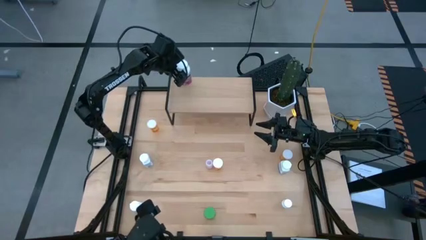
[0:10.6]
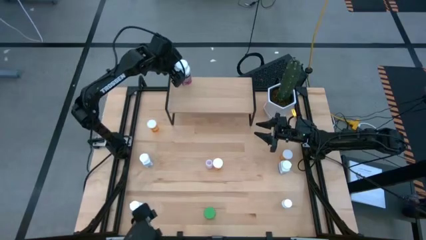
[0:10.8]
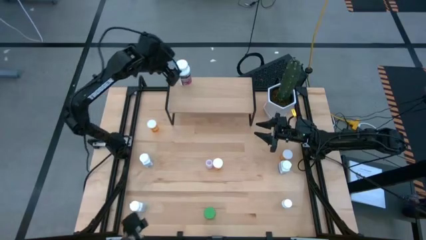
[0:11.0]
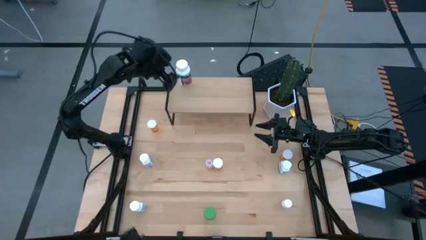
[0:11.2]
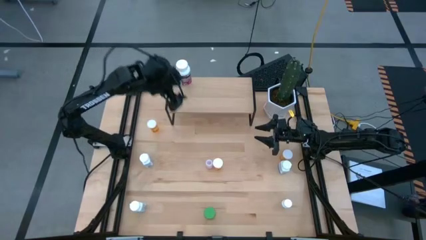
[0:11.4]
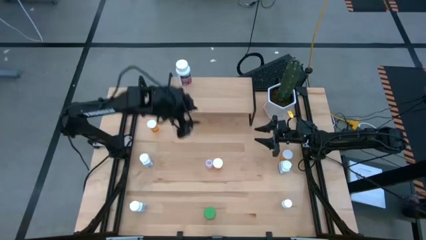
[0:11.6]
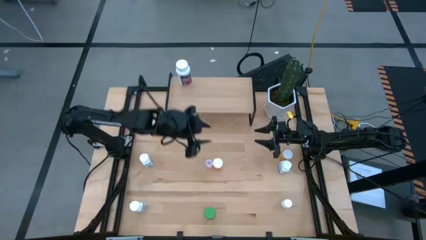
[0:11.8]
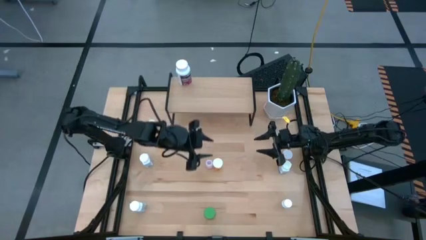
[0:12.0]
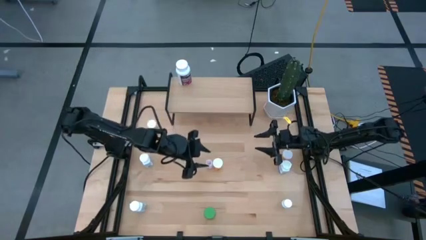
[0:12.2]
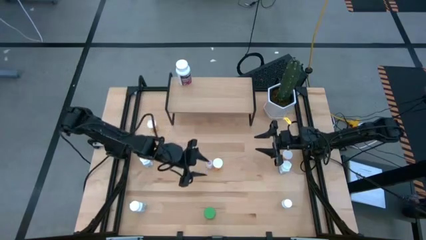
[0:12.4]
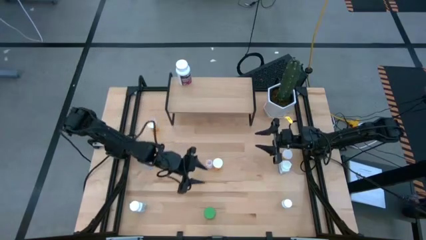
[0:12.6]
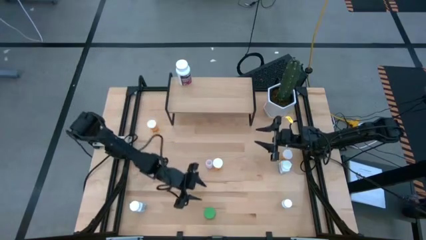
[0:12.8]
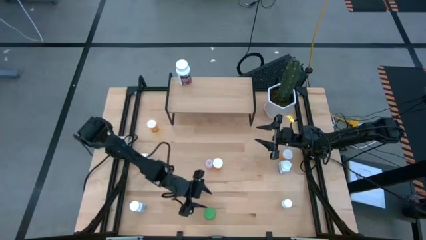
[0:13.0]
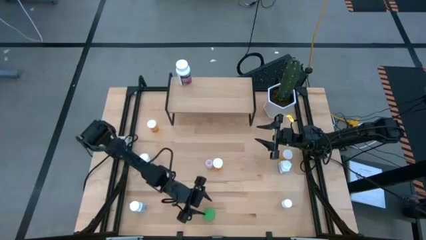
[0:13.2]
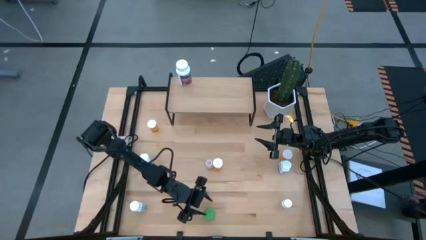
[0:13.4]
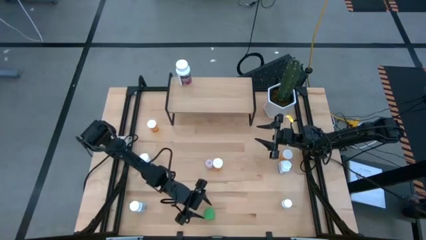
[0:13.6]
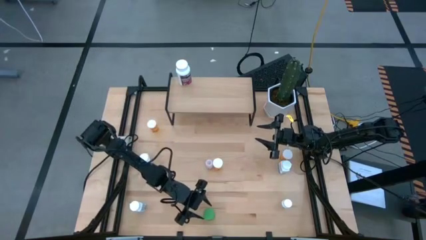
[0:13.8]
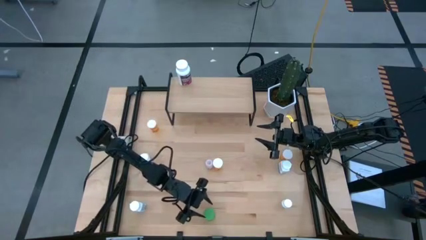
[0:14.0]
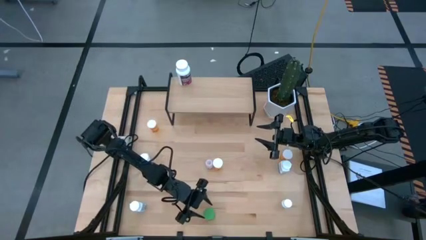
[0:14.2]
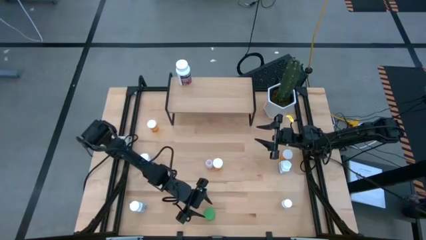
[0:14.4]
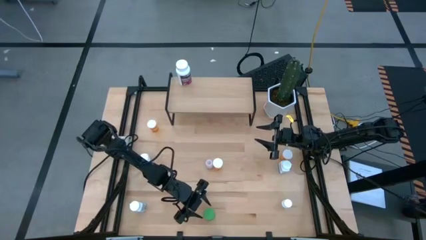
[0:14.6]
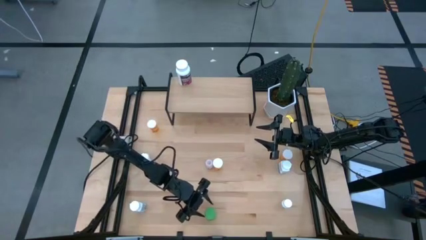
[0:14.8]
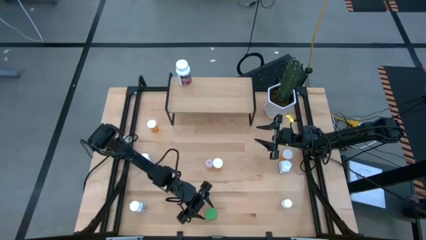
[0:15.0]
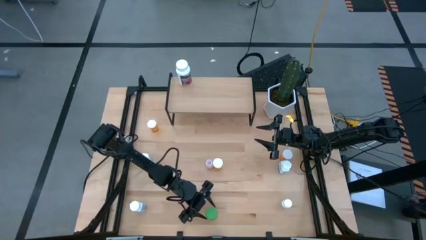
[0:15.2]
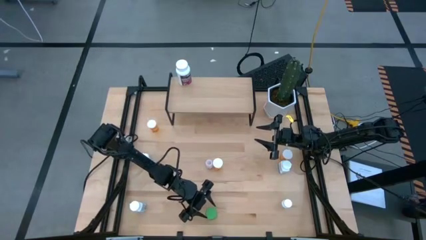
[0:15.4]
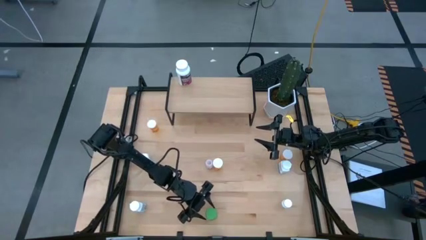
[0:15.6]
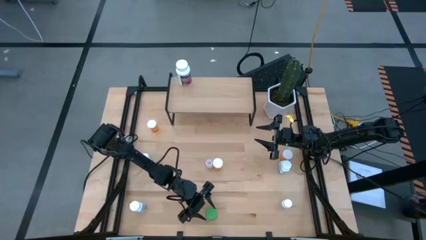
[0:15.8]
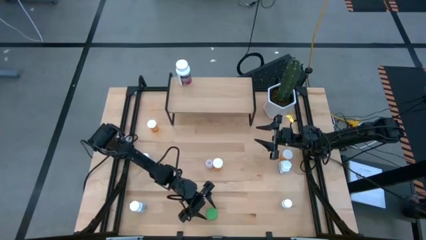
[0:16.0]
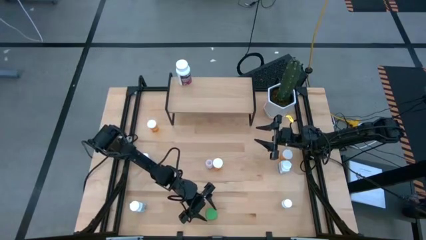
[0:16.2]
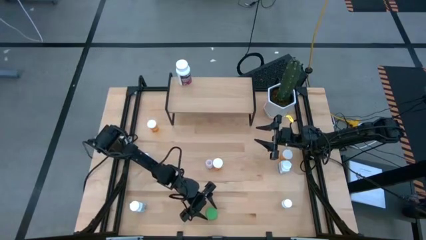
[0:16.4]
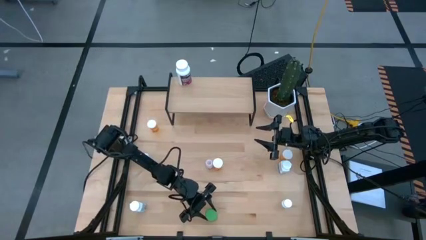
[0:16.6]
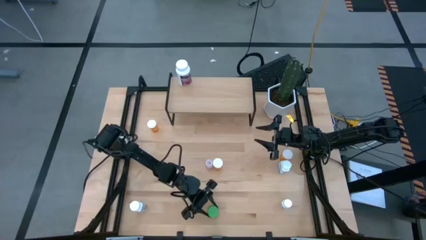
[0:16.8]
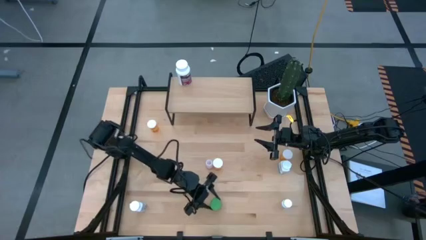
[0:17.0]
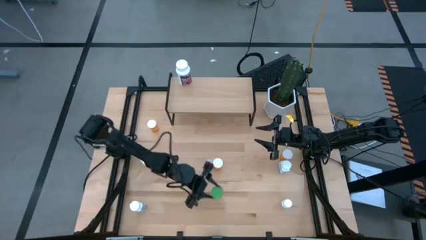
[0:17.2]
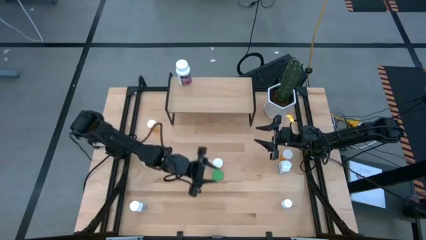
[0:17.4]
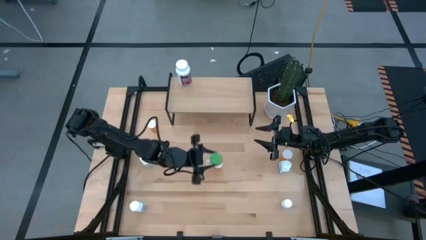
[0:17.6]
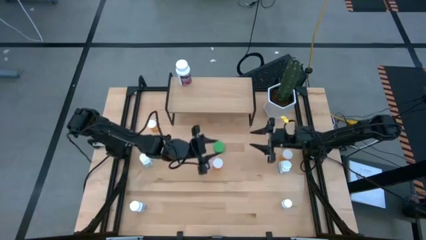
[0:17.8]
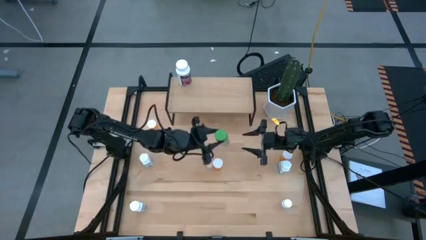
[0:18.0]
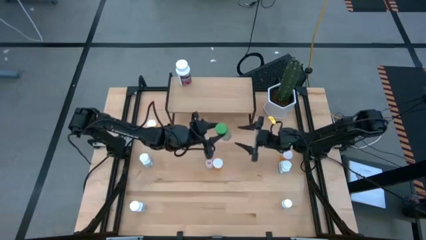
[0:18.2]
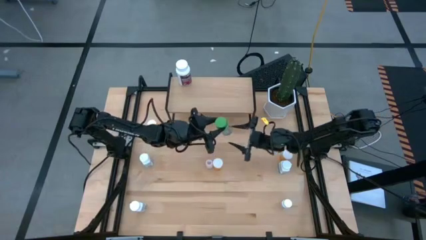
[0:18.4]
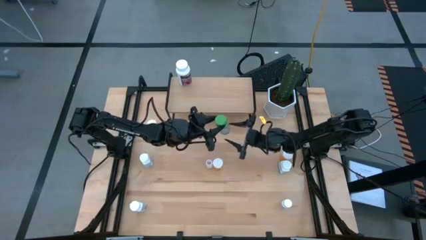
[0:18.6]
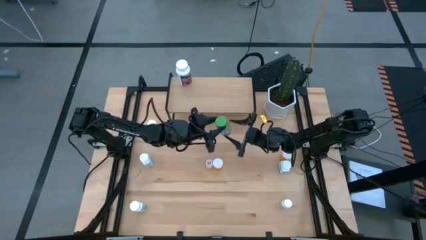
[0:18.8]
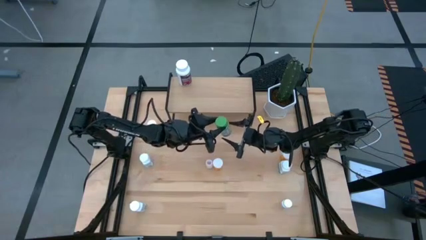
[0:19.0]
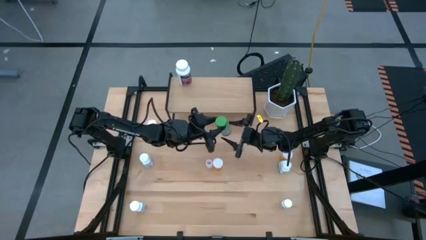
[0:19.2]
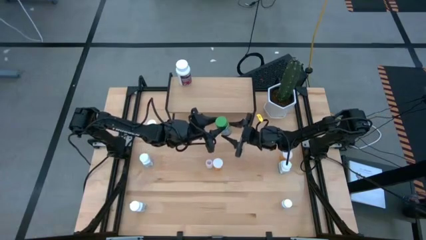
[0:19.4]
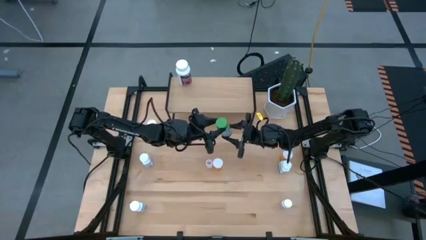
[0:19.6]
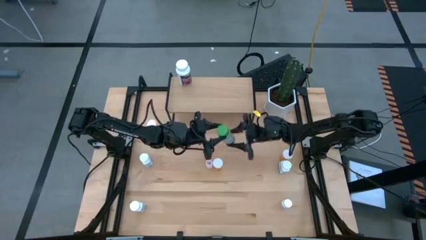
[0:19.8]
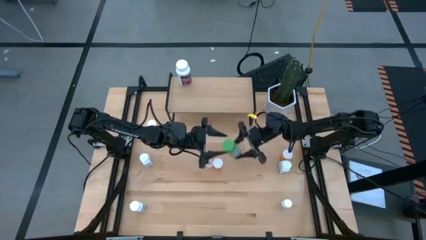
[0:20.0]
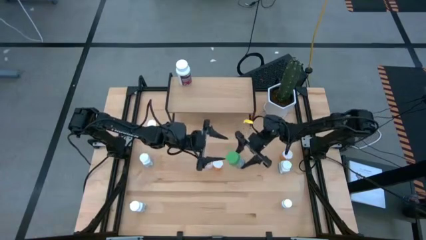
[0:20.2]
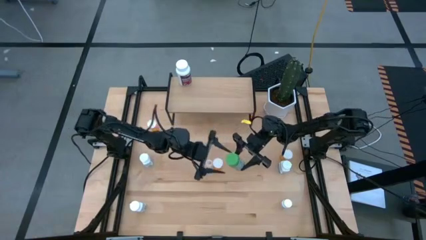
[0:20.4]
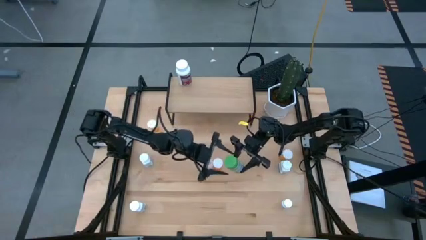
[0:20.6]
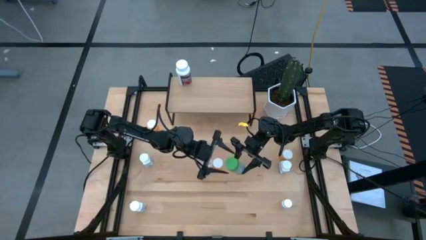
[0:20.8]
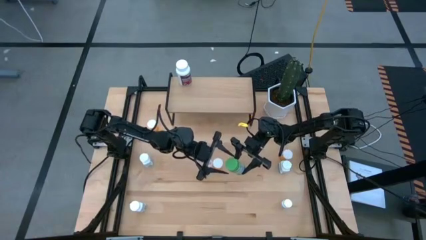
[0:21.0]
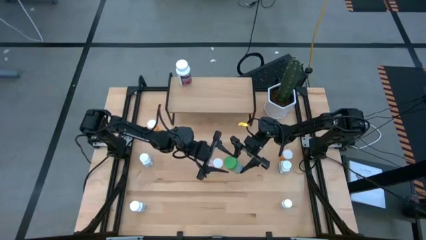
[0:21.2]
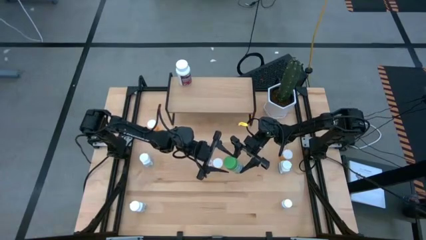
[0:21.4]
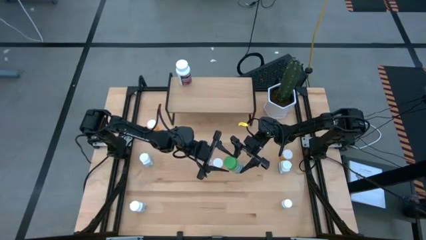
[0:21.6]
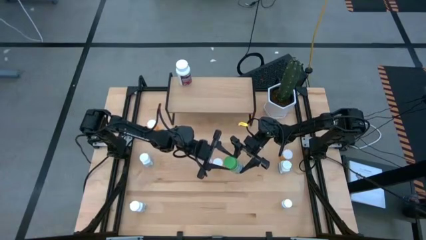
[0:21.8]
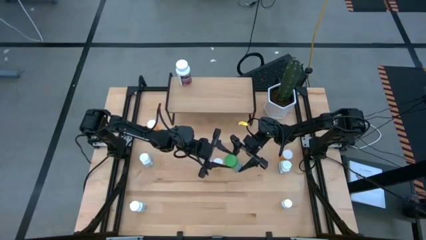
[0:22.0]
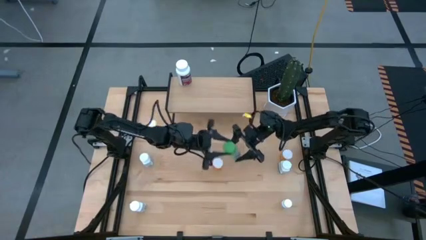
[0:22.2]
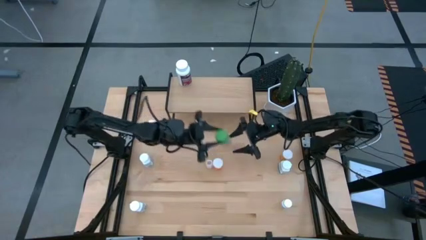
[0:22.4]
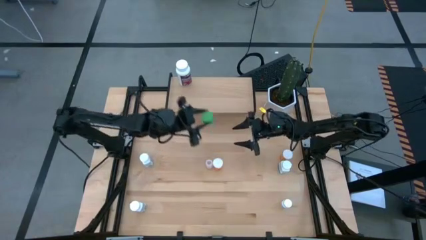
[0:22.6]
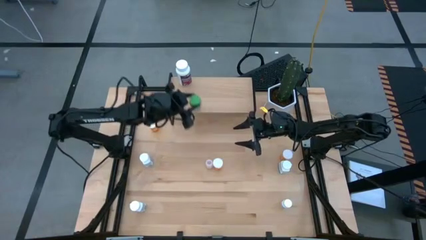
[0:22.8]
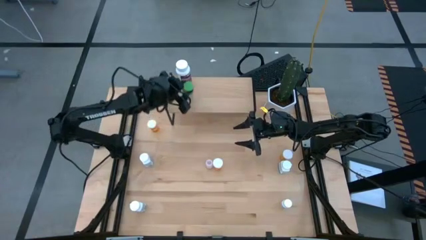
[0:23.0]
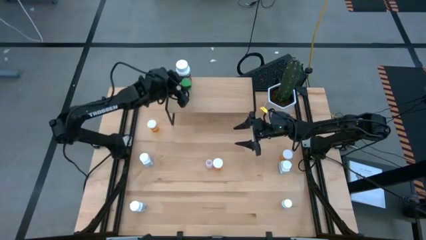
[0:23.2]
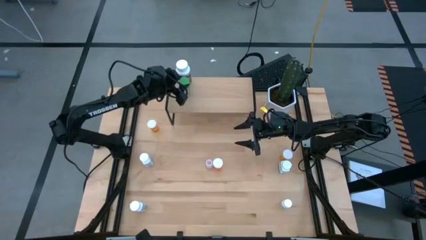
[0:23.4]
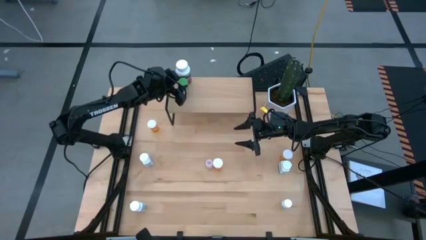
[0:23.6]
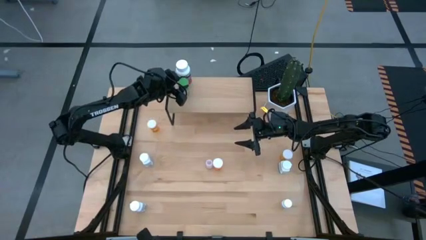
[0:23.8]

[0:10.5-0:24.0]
Task: Pick and place medicine bottles onto shelf by color
Put the green pill bottle on the shelf

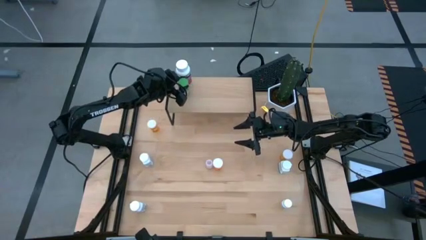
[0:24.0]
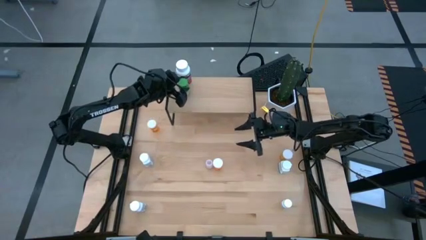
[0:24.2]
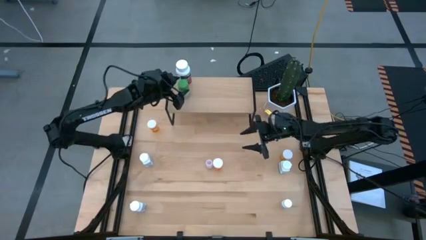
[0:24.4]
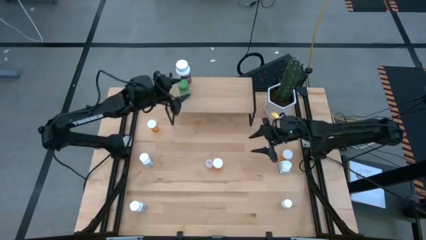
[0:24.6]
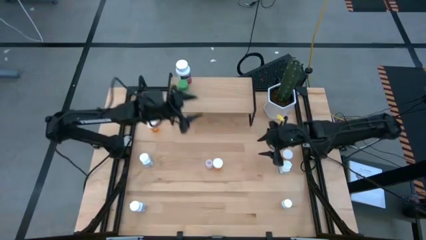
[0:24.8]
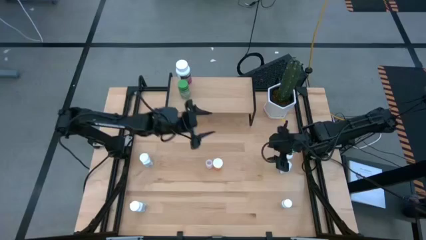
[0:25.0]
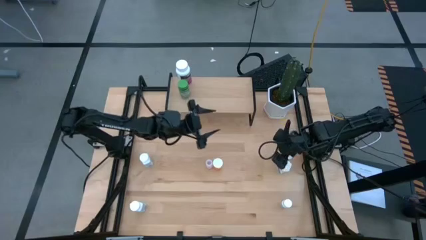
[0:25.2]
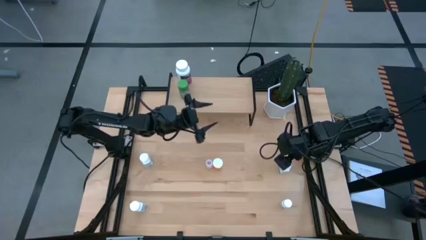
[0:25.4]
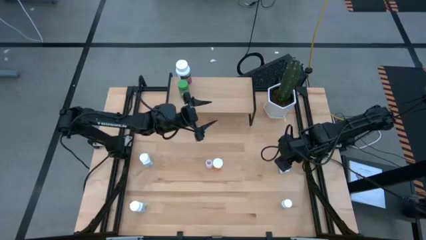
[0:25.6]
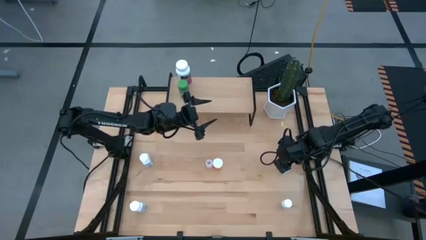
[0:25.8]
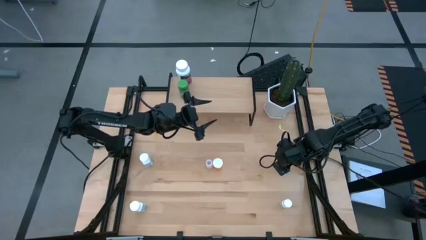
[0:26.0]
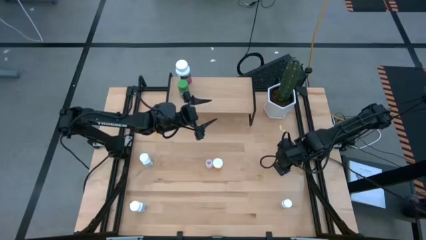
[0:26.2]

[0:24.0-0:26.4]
Put the white blue pill bottle on the shelf
